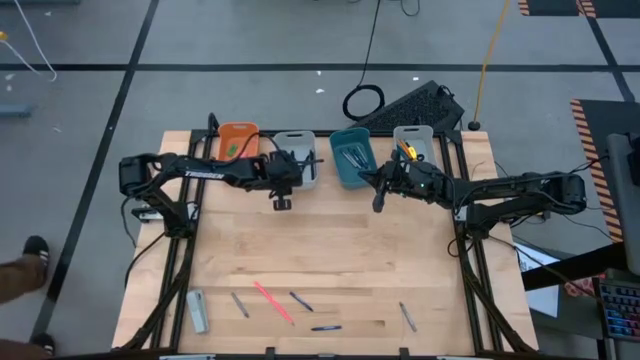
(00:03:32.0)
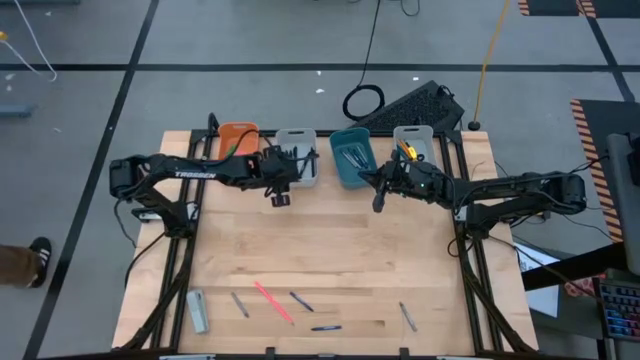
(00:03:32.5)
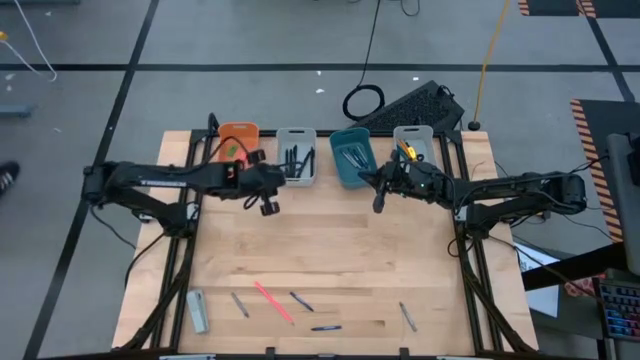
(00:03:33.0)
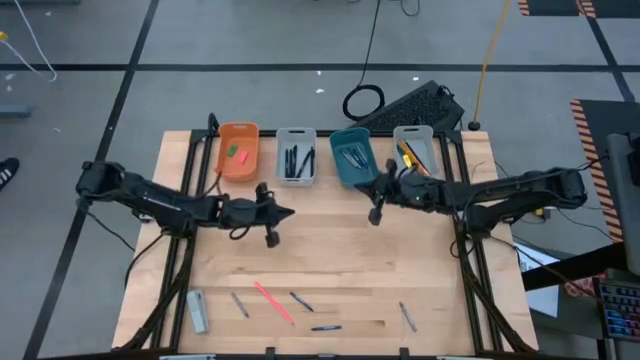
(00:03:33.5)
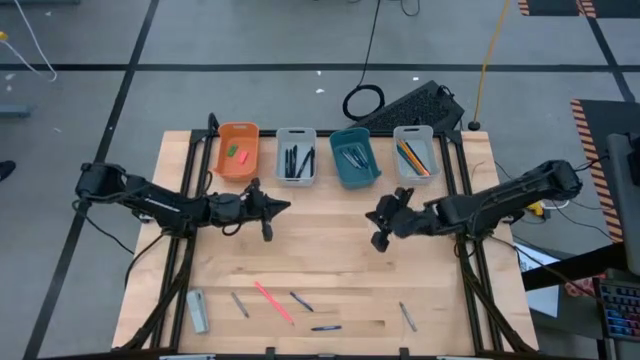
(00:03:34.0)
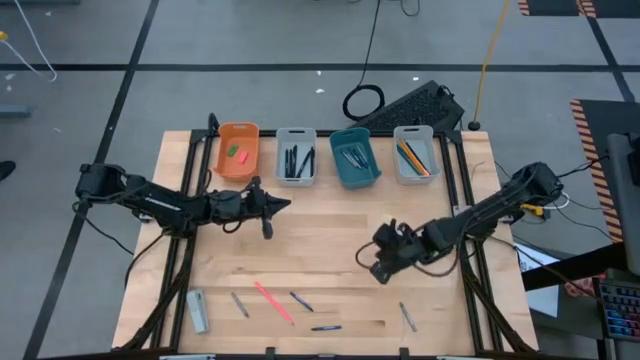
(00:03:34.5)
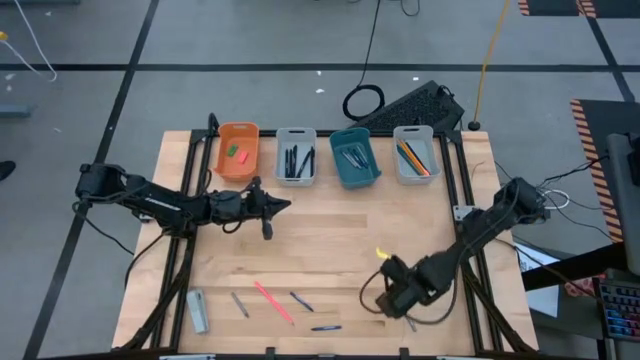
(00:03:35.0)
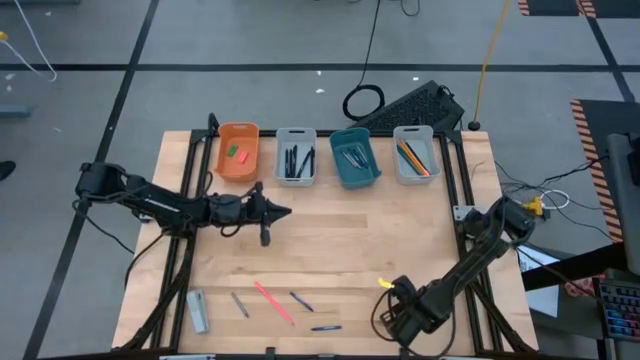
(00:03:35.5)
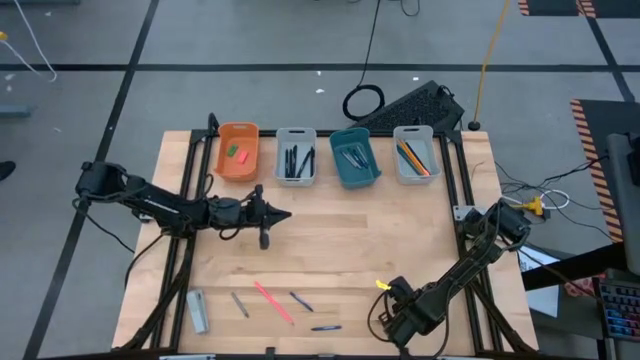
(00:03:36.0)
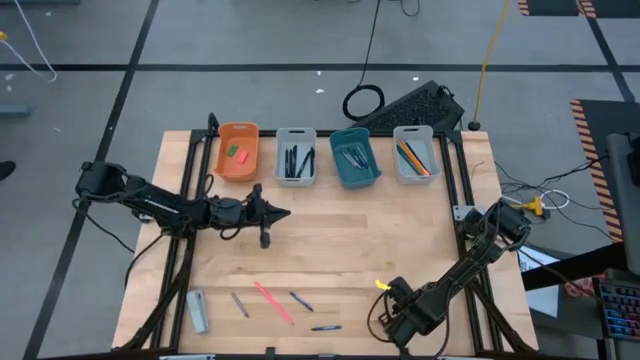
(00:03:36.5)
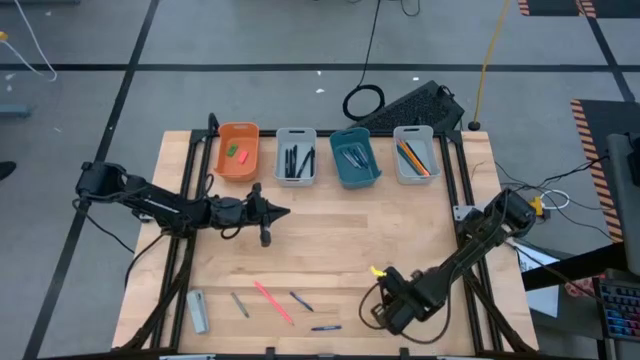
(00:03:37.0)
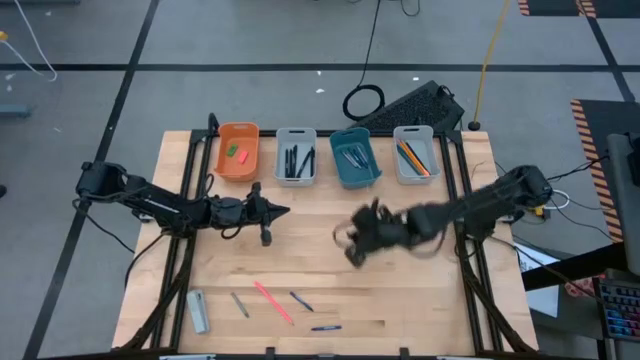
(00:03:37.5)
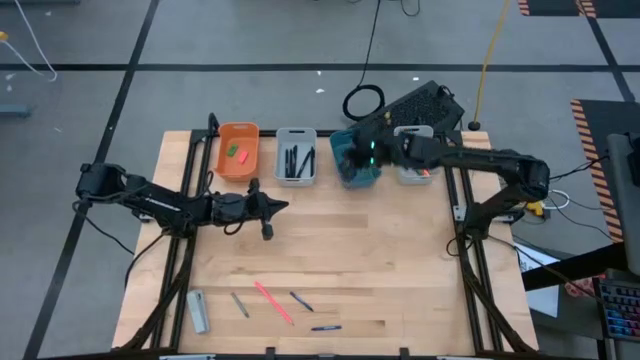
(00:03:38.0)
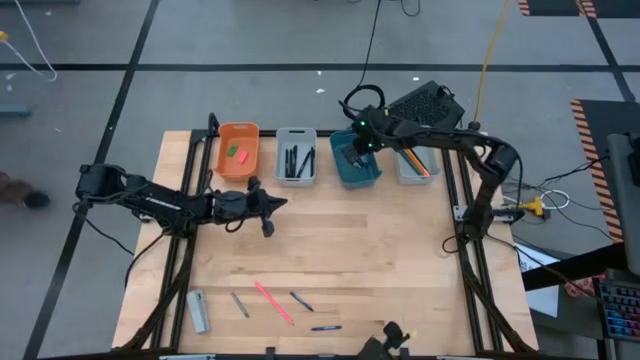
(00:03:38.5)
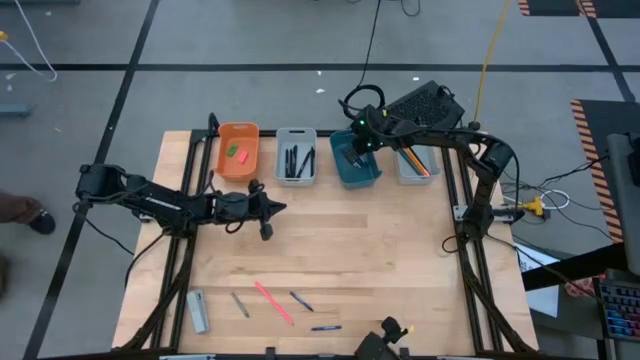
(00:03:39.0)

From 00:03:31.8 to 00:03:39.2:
Task: Sort crayons/erasers/pens/pencils in bins
Put the gray crayon into the blue bin

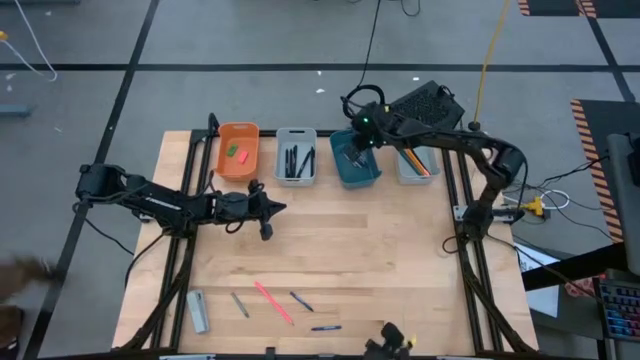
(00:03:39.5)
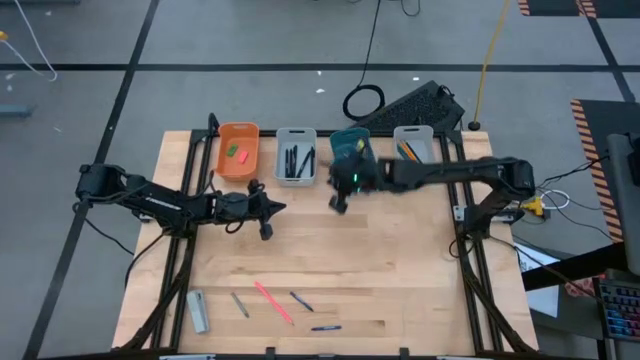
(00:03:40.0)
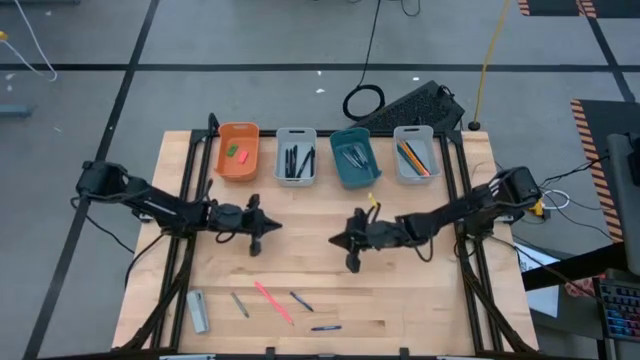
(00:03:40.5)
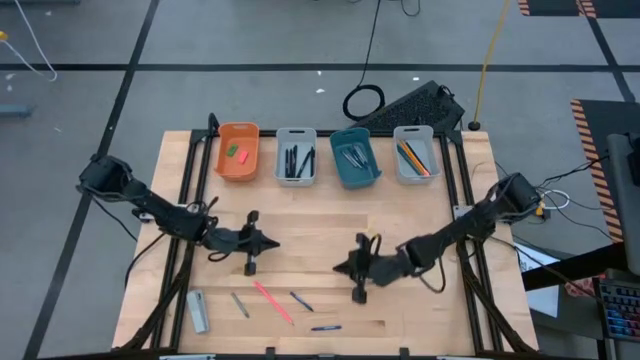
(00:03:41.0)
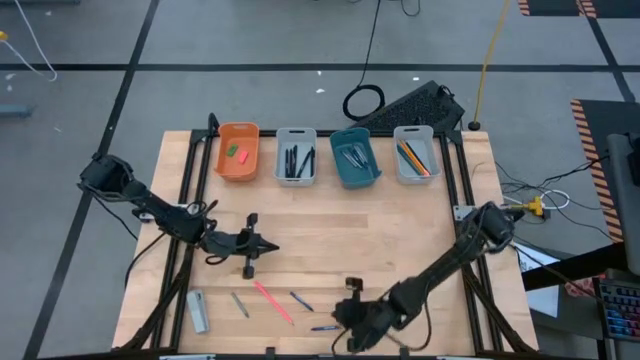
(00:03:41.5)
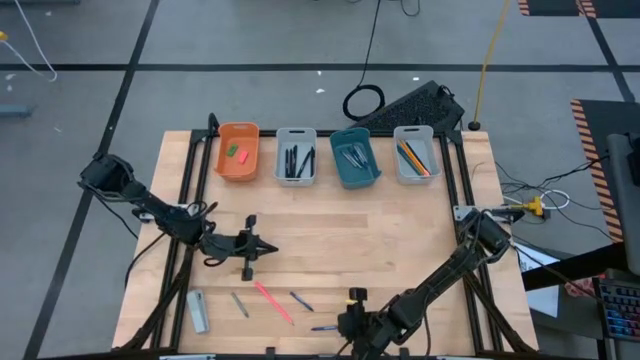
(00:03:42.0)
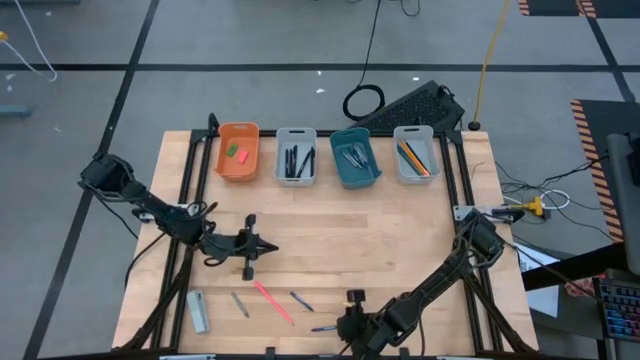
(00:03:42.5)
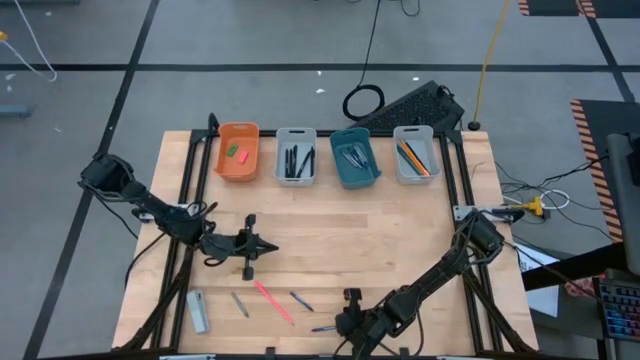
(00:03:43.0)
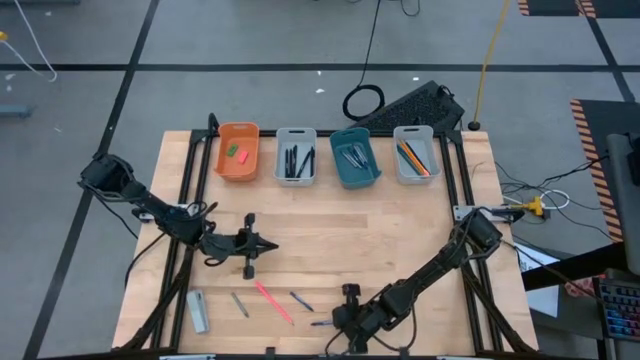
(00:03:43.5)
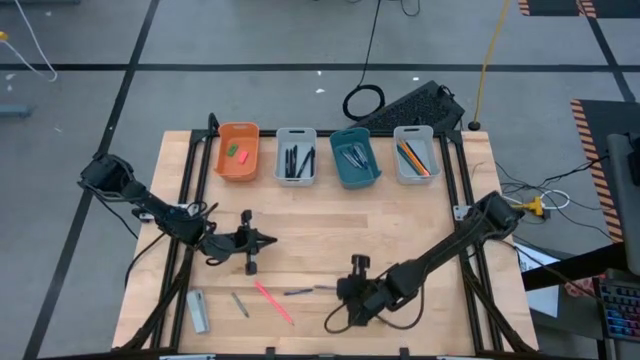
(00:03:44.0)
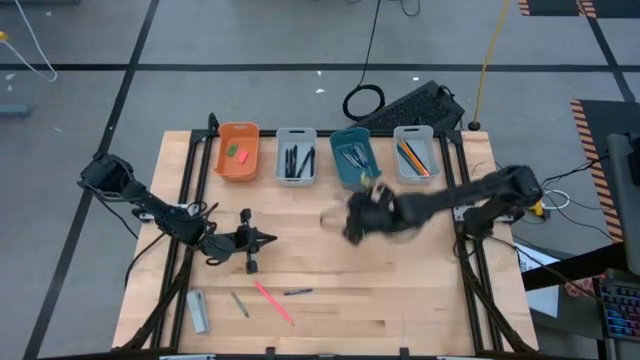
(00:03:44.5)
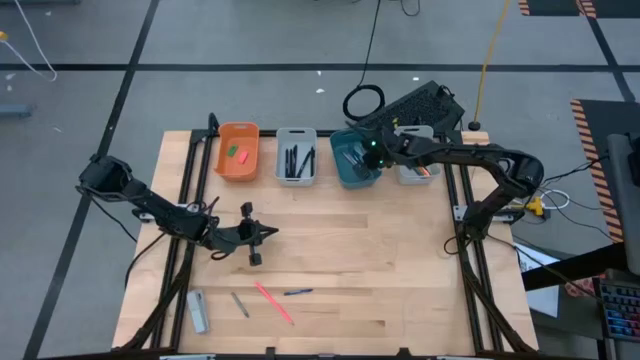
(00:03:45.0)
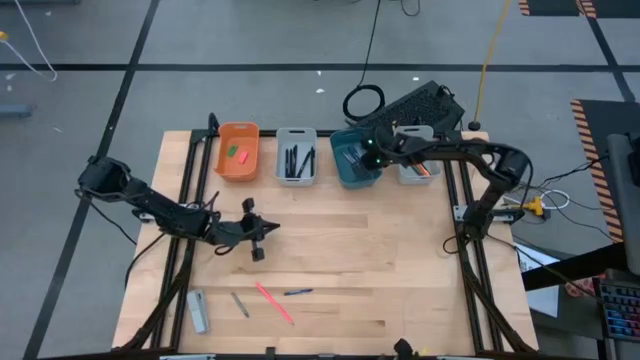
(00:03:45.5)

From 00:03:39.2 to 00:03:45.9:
Put the blue crayon into the blue bin

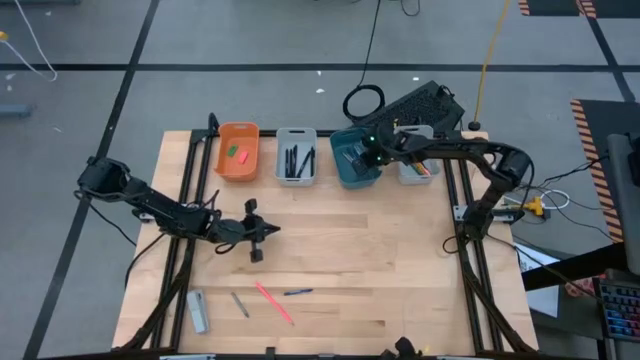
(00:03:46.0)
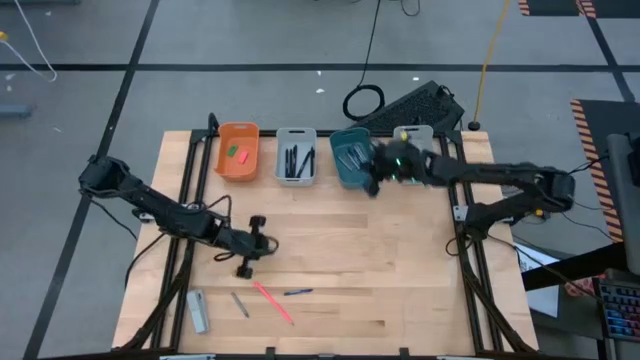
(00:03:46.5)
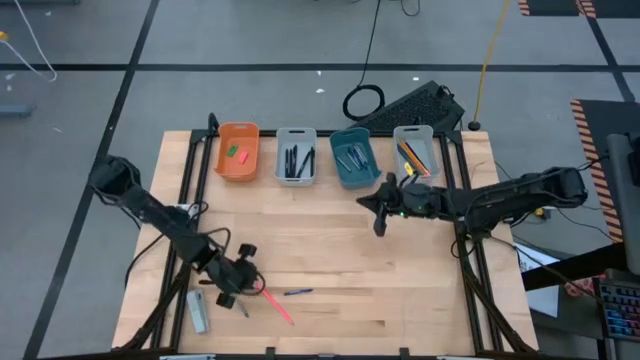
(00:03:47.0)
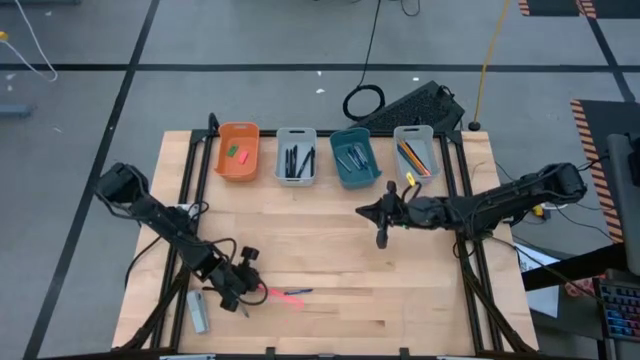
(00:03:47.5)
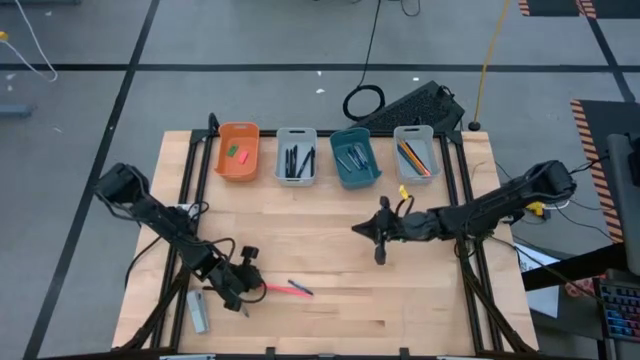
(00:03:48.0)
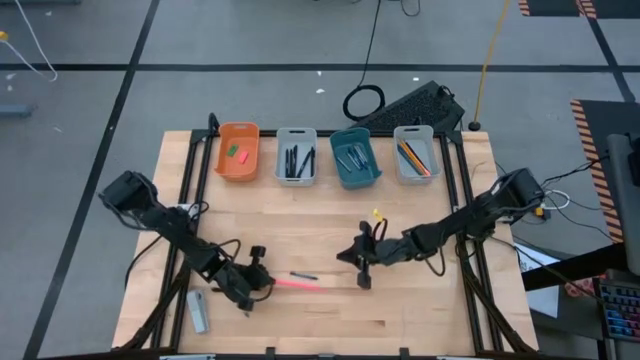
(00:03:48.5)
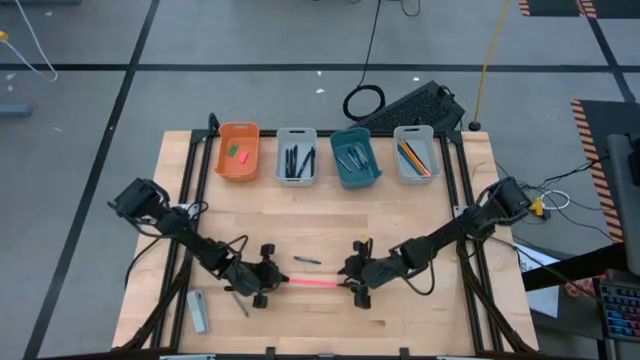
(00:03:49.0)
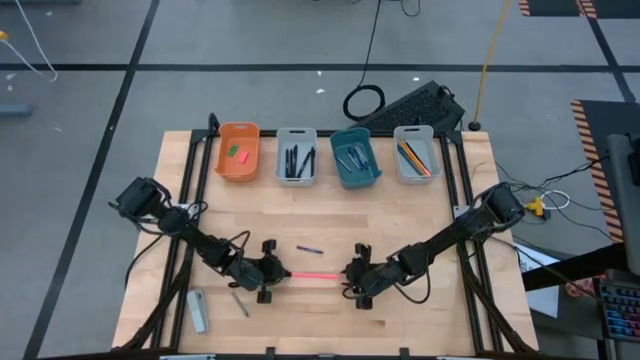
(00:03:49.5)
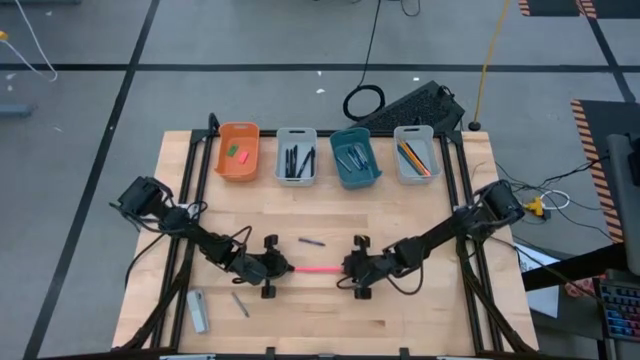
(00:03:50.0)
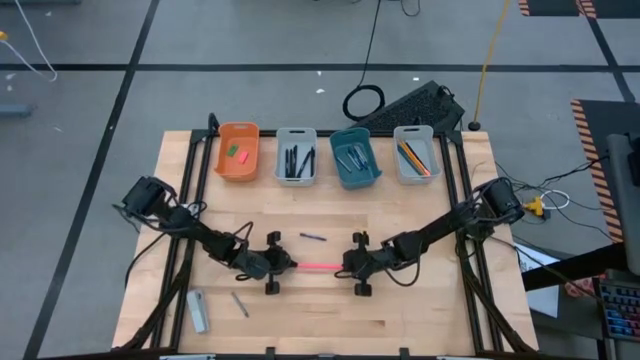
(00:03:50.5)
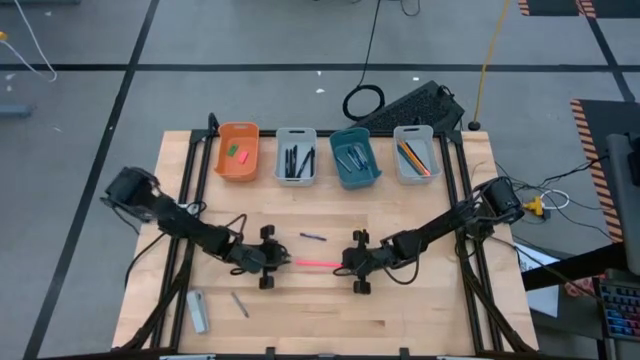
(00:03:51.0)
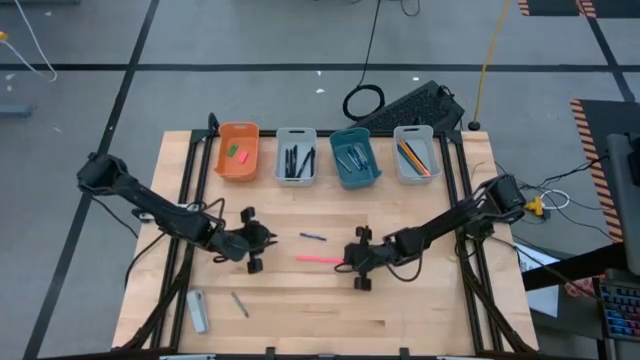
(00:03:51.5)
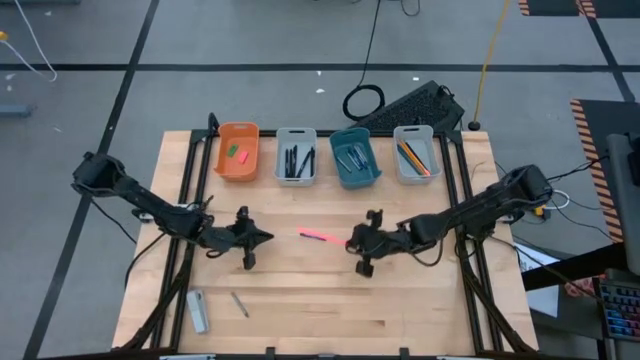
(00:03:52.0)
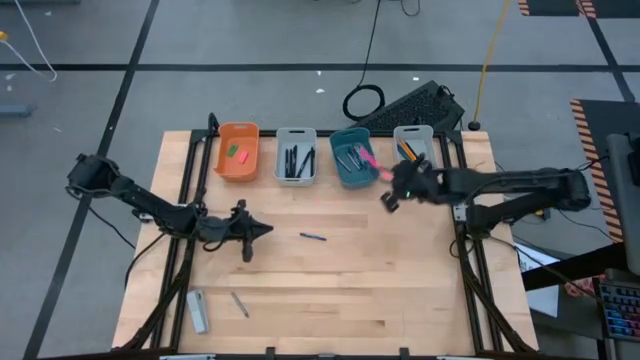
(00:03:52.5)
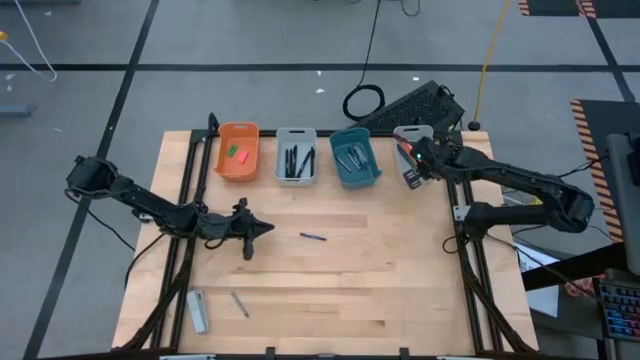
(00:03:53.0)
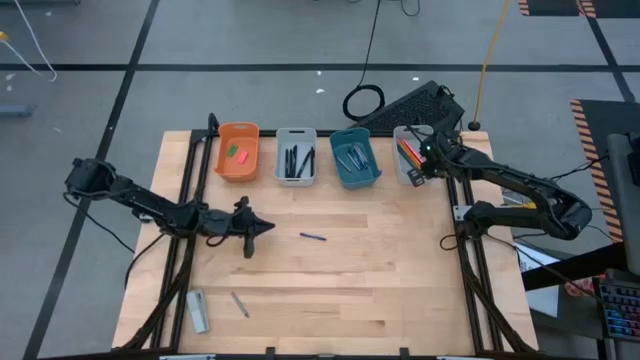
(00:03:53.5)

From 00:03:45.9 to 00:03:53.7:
Put the pink colored pencil into the right gray bin
